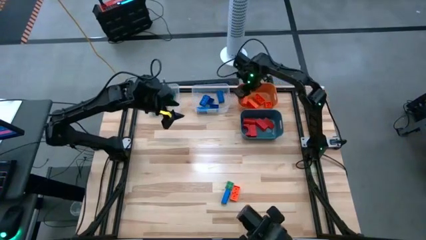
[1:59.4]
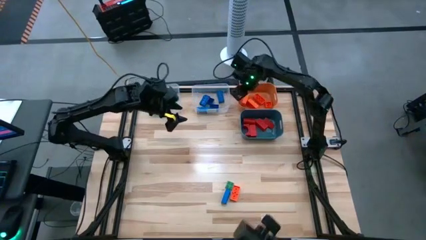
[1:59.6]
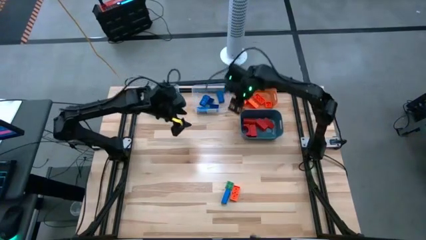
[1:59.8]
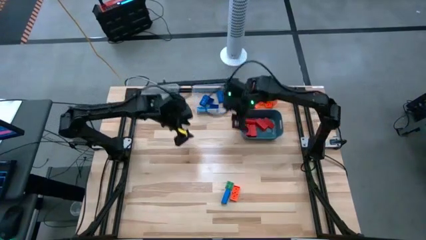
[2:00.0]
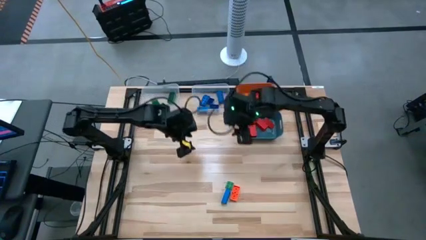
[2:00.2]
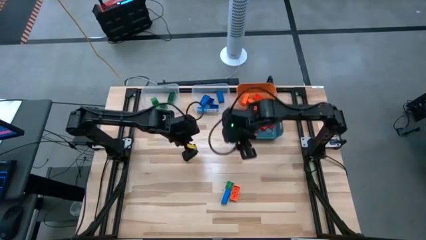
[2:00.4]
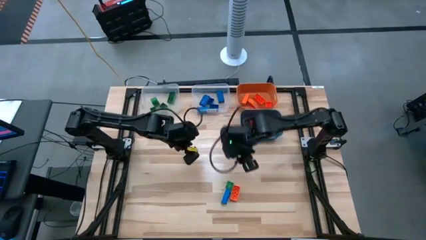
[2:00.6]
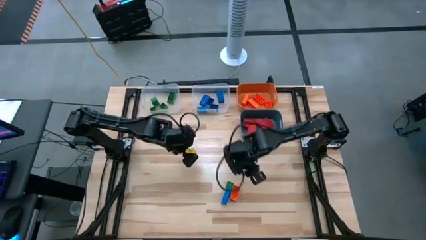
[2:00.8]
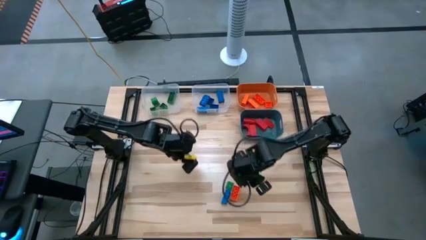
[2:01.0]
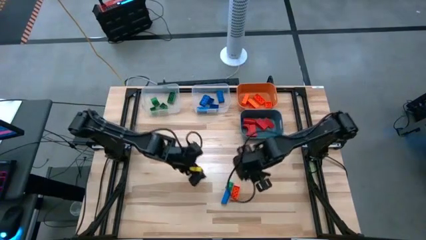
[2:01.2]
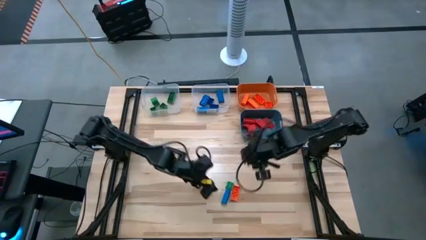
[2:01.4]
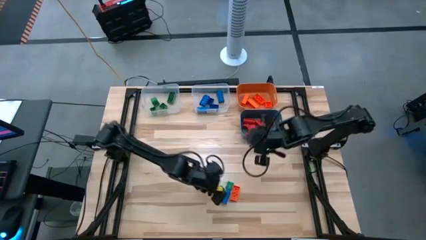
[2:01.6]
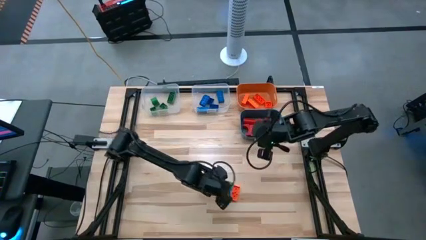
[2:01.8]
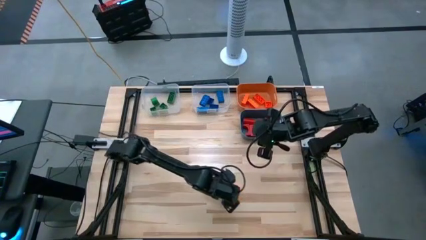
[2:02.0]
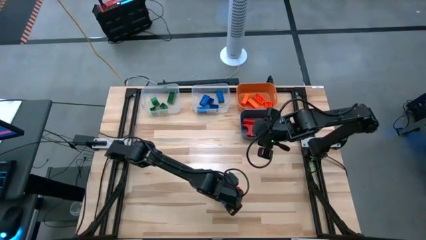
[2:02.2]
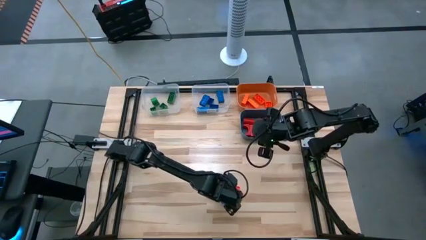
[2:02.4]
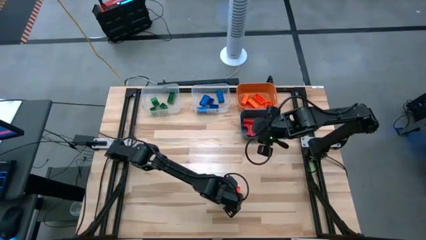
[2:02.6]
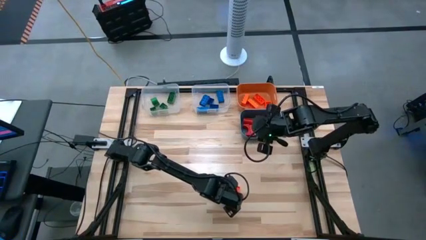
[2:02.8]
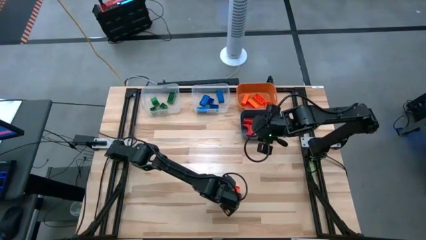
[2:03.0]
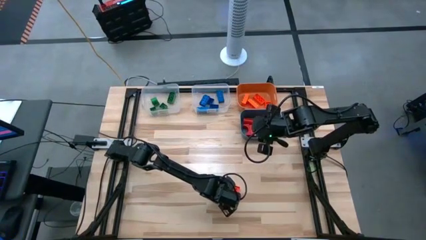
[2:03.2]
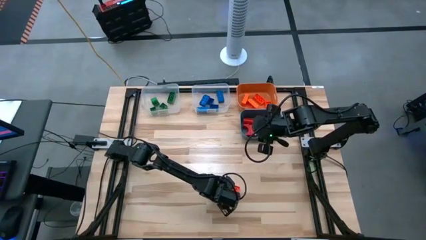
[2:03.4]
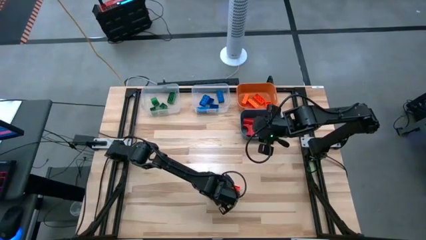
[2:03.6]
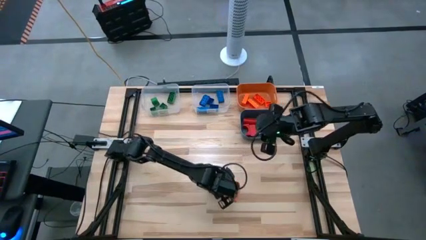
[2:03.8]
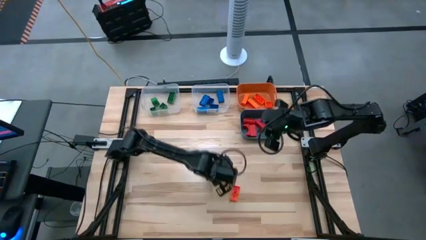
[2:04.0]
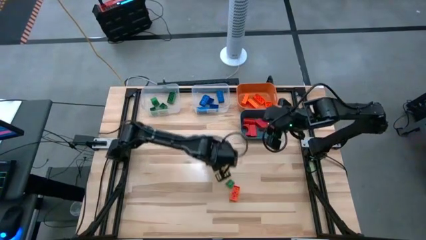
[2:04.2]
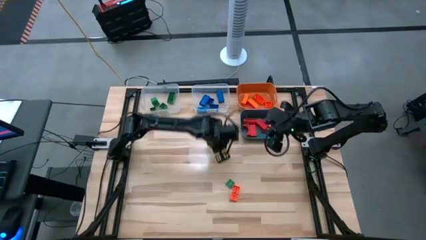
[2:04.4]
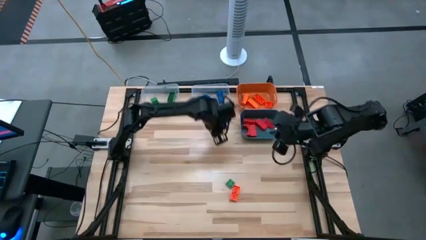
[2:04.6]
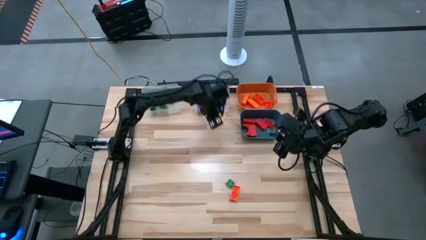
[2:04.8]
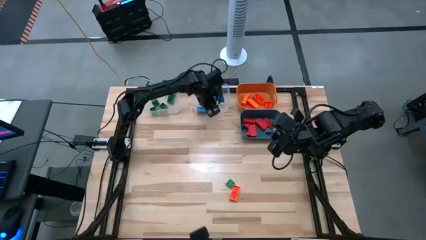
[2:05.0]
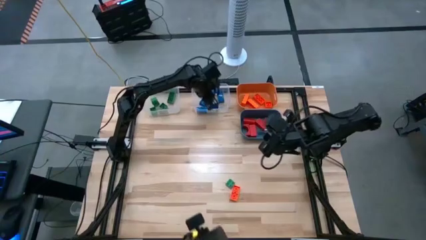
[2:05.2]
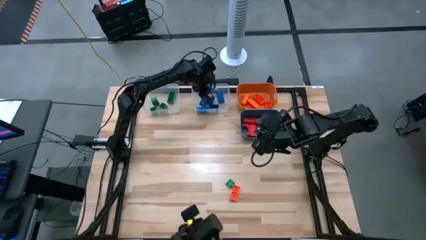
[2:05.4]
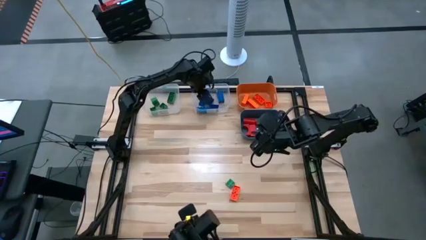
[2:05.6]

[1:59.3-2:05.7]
Task: Sort blocks
Put the blue game piece into the right transparent bin

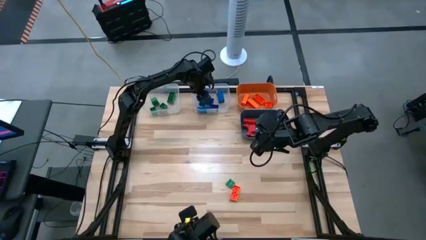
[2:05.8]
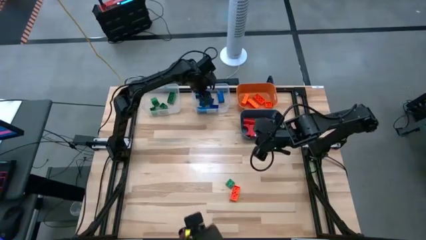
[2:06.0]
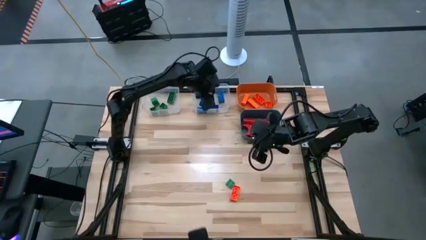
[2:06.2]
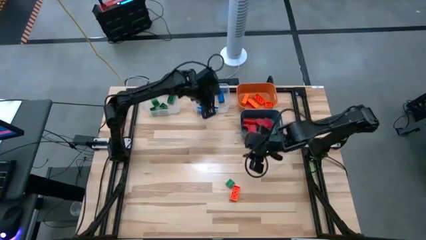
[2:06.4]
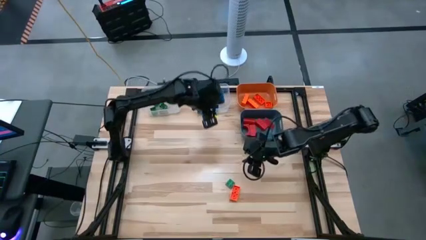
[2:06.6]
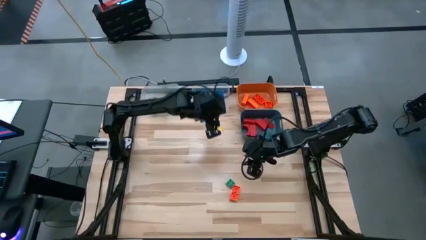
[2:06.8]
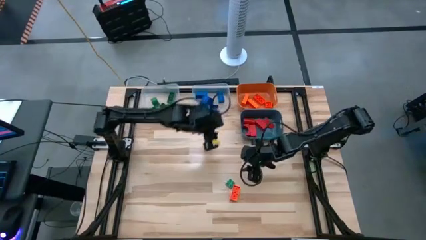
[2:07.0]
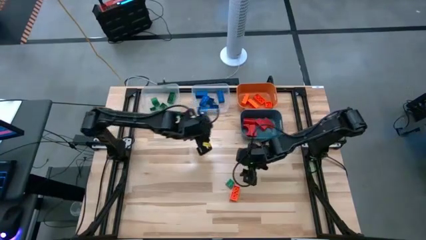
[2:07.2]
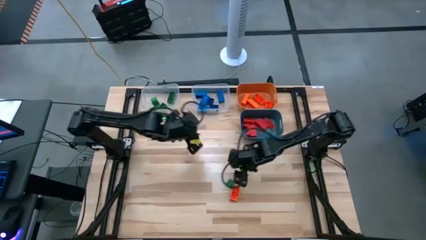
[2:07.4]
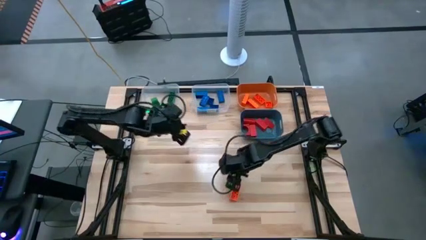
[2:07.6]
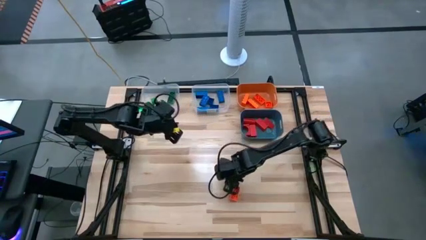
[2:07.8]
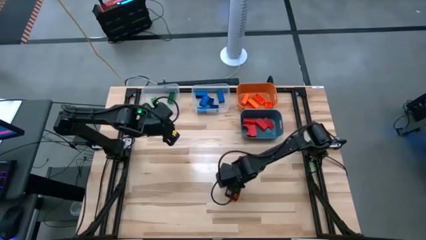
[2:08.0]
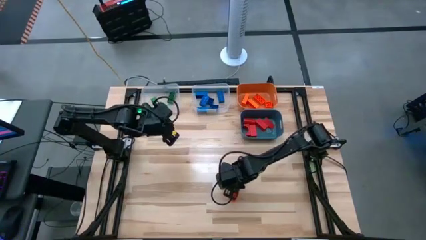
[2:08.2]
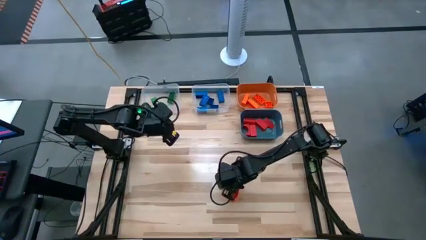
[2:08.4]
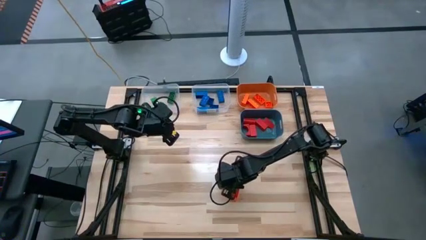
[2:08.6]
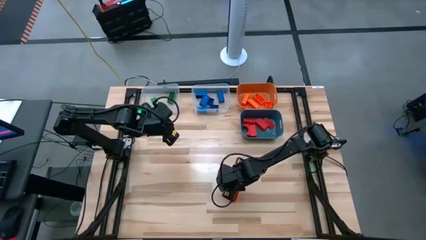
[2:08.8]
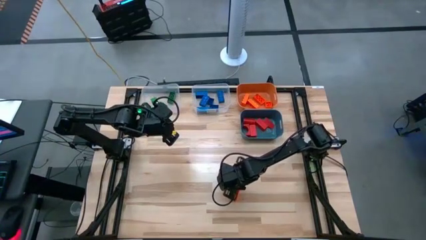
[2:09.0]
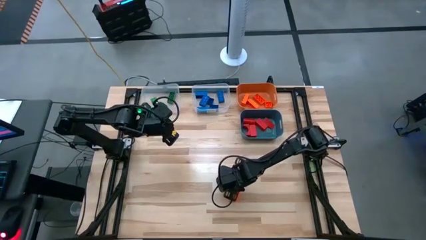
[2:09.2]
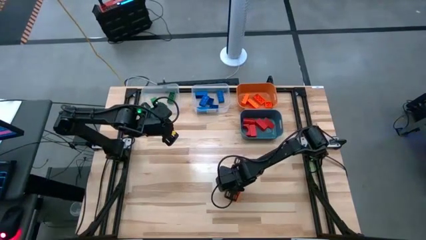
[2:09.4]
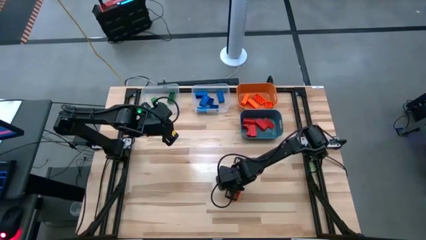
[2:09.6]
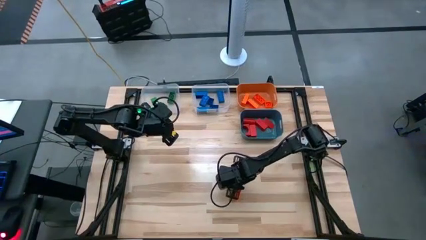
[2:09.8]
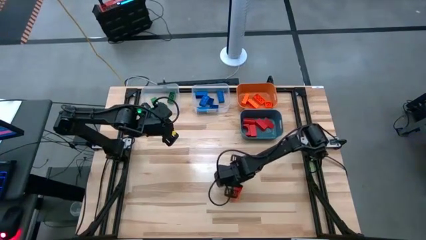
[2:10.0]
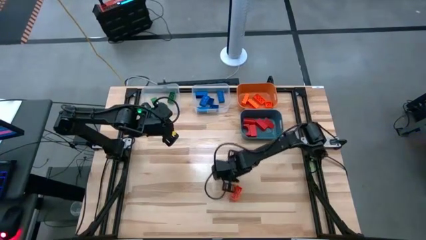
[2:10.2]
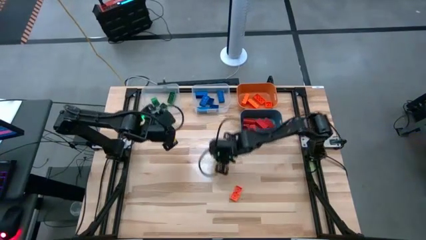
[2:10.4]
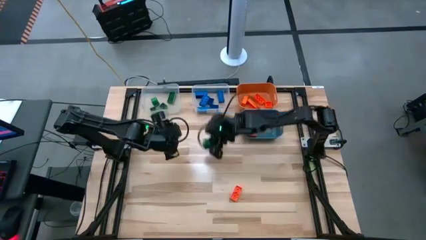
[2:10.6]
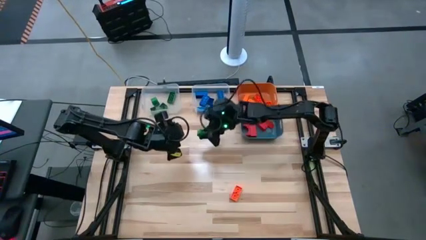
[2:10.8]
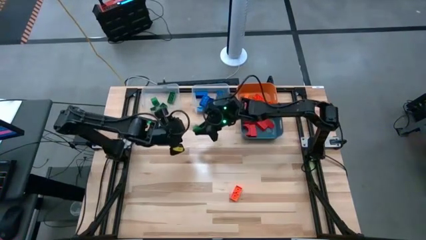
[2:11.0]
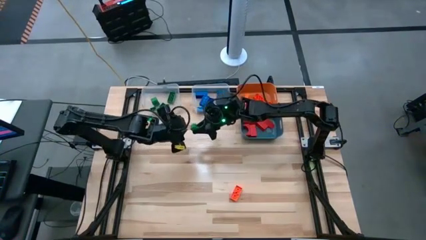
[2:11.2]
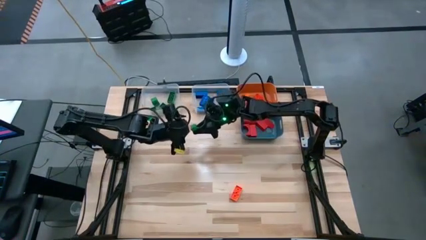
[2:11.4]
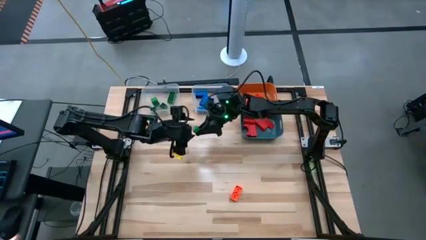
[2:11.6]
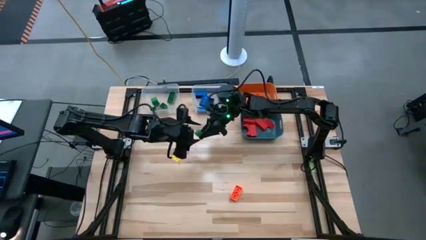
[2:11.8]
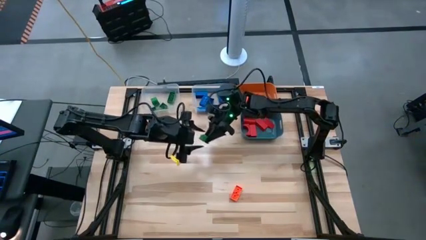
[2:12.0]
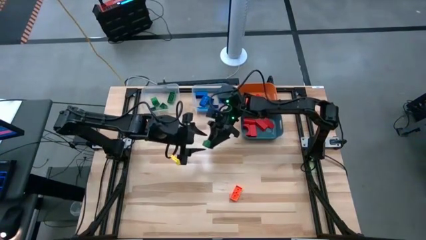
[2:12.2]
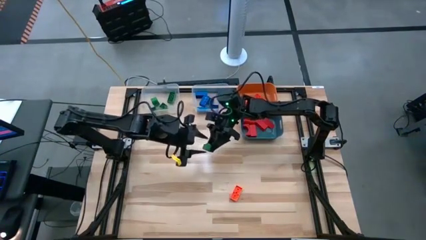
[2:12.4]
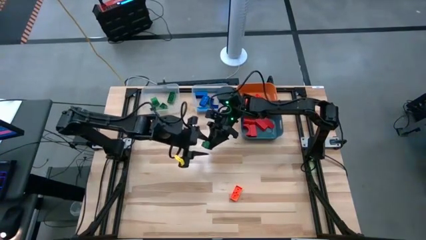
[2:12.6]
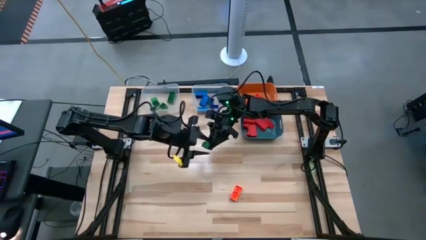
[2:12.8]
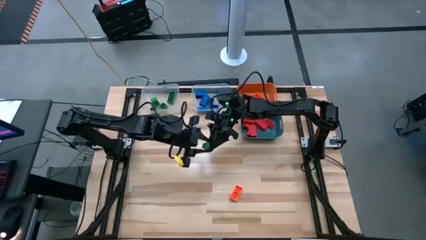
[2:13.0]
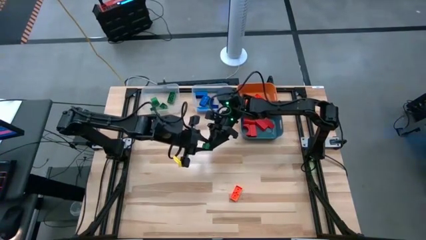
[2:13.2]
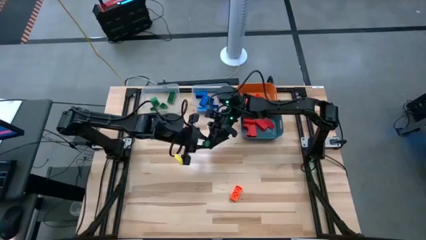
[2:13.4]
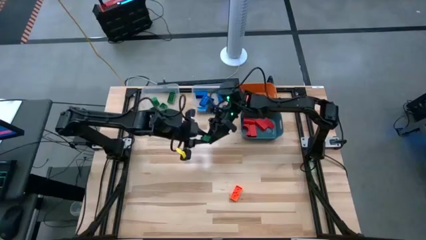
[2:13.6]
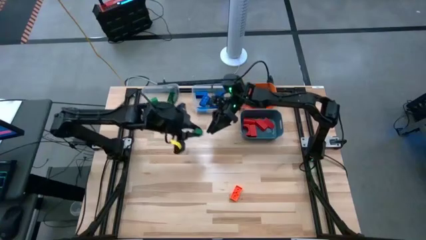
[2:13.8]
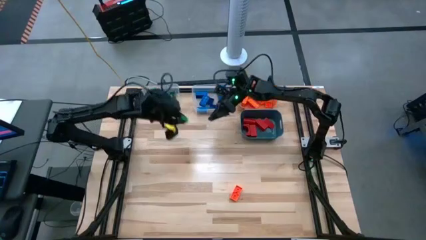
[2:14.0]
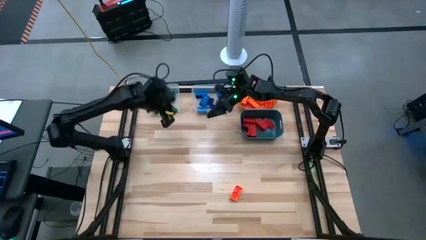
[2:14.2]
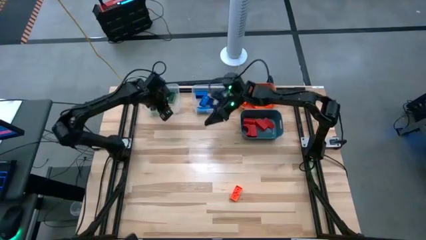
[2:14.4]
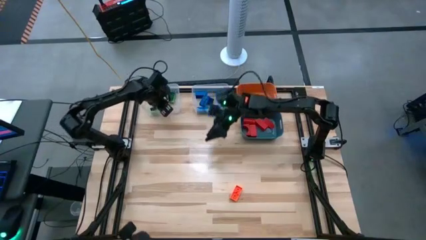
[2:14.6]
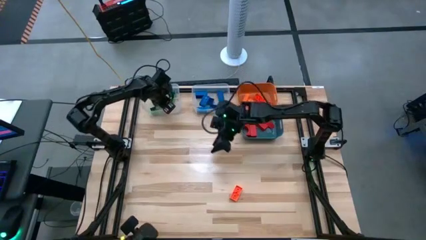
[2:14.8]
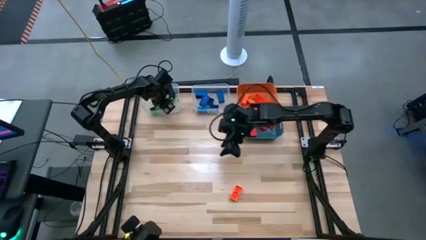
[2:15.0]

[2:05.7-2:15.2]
Put the green game piece into the left transparent bin
